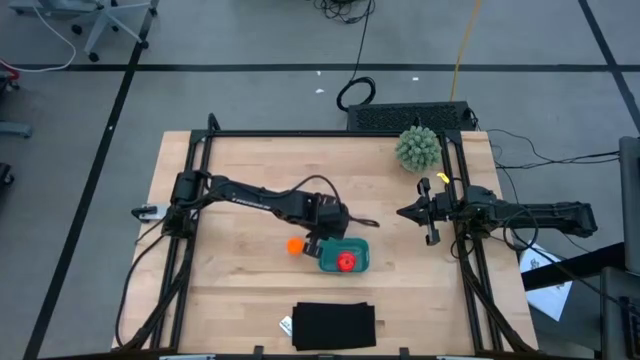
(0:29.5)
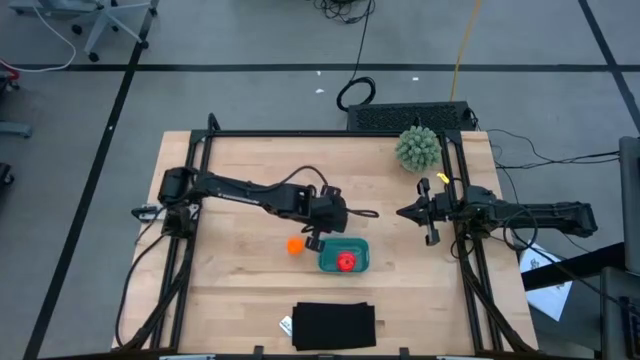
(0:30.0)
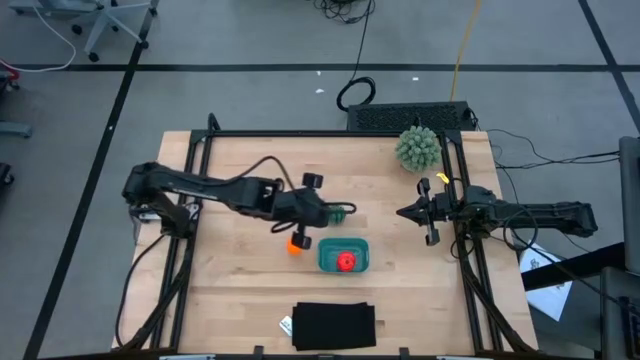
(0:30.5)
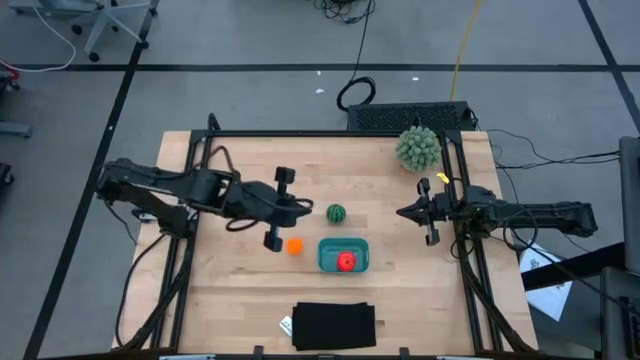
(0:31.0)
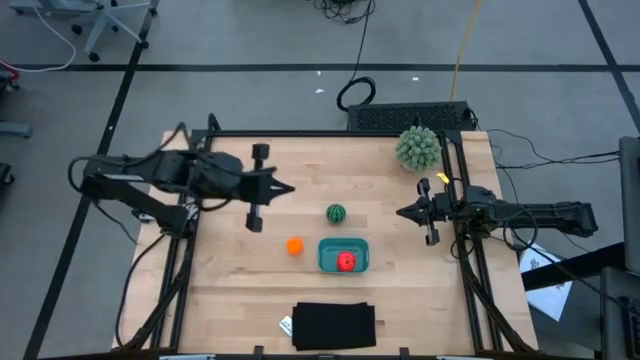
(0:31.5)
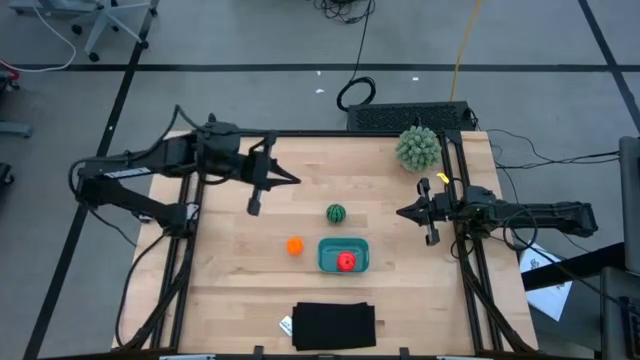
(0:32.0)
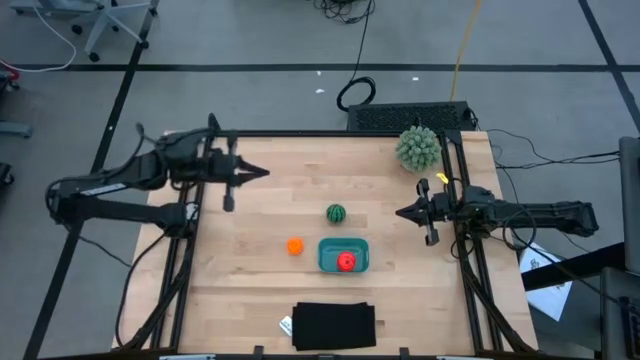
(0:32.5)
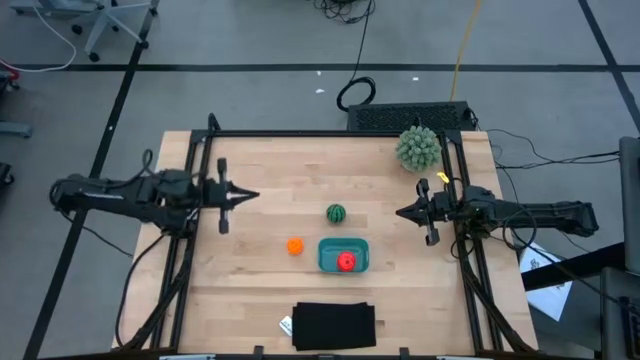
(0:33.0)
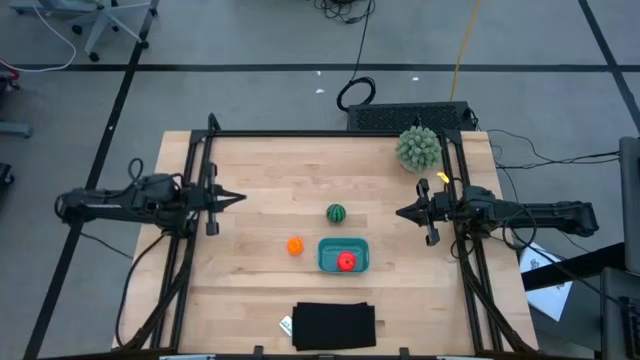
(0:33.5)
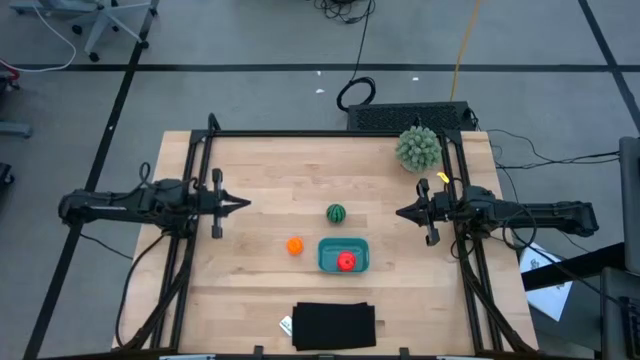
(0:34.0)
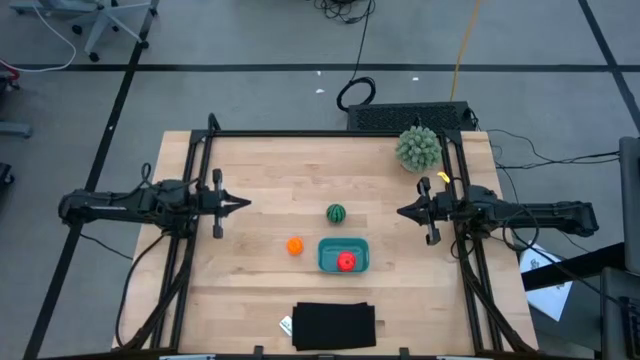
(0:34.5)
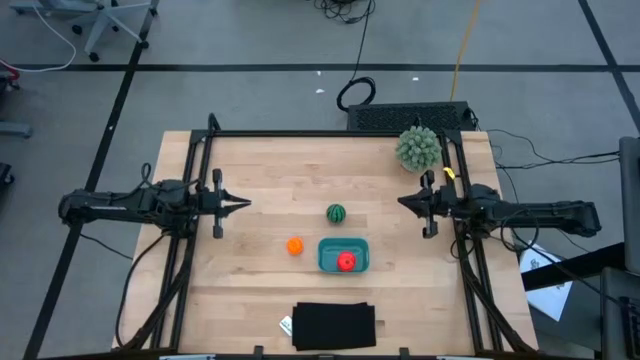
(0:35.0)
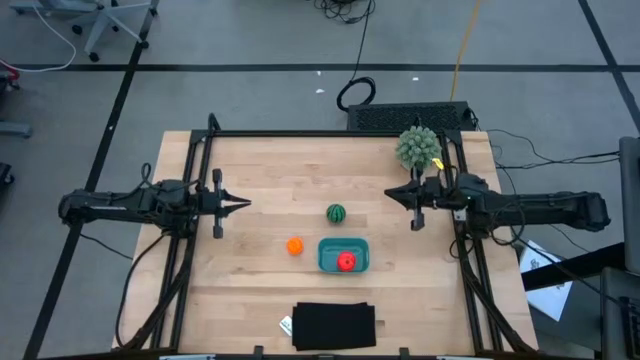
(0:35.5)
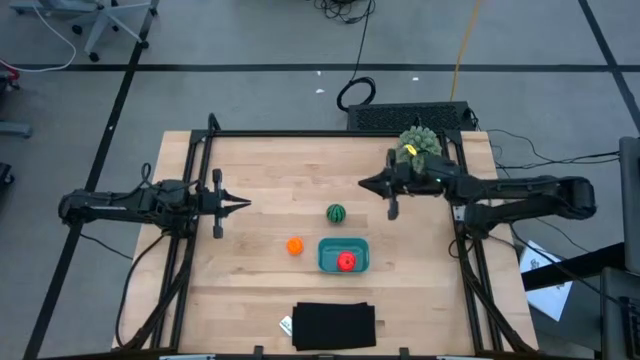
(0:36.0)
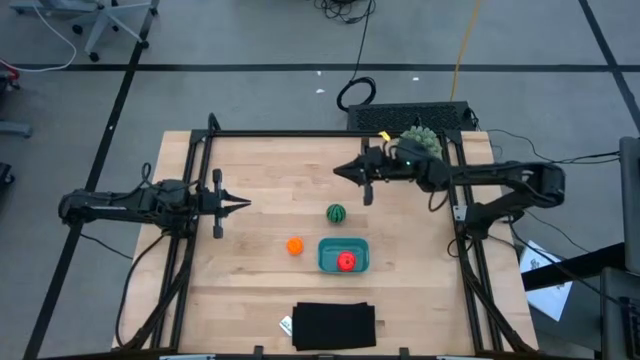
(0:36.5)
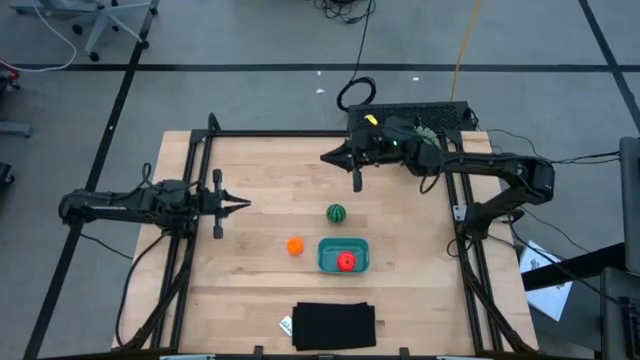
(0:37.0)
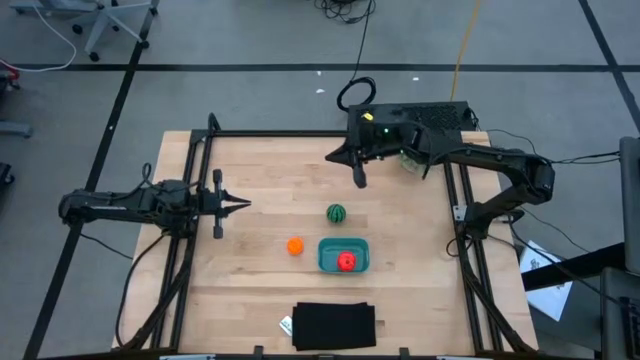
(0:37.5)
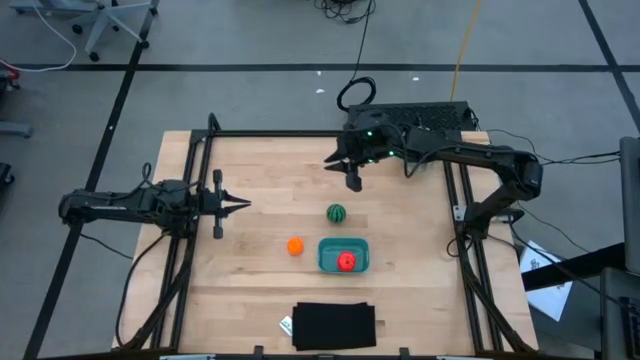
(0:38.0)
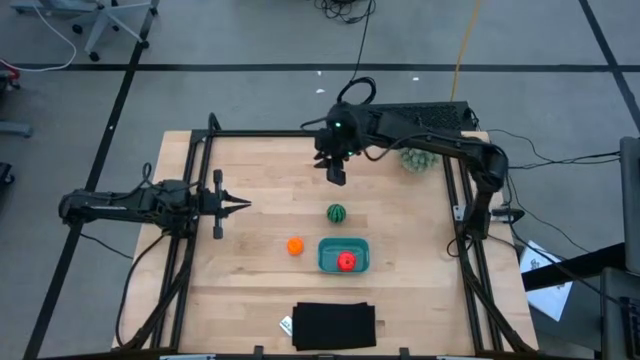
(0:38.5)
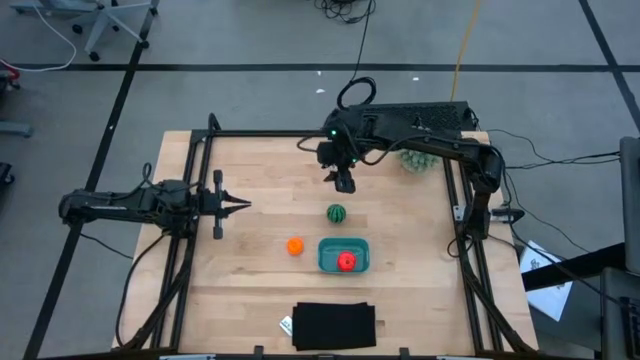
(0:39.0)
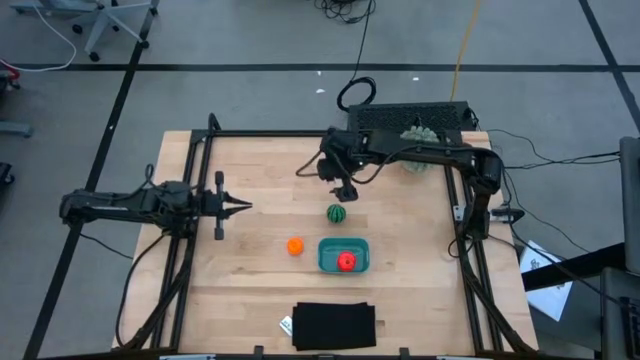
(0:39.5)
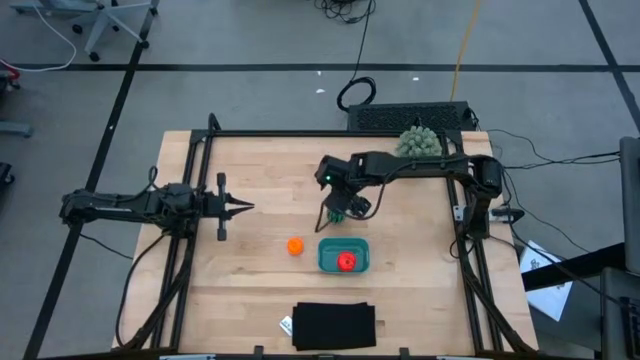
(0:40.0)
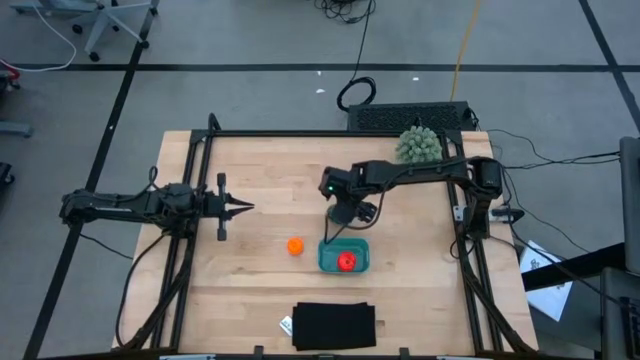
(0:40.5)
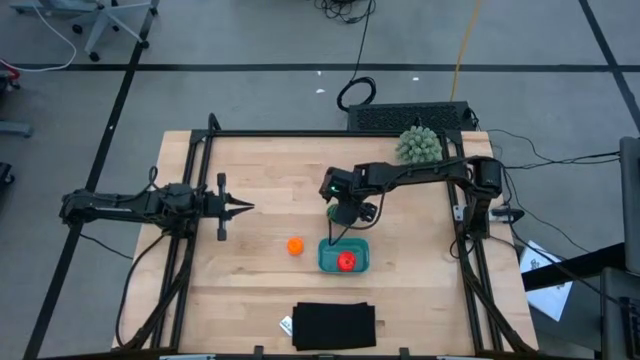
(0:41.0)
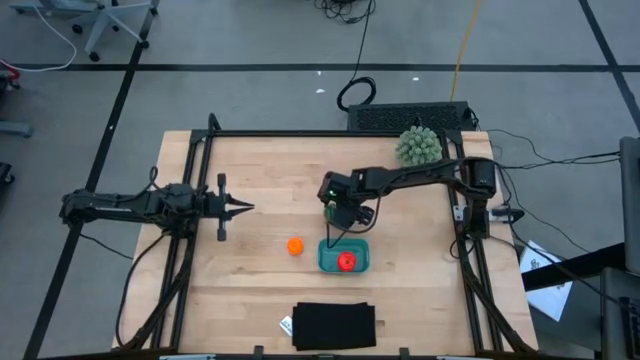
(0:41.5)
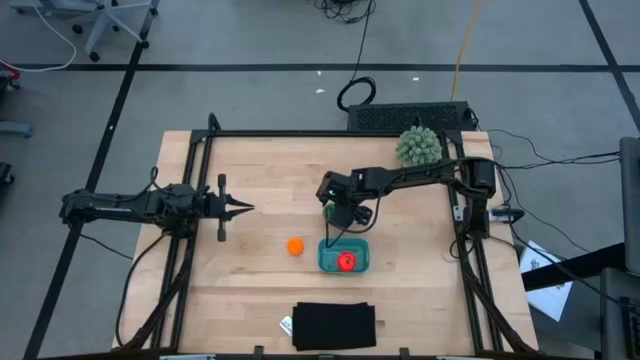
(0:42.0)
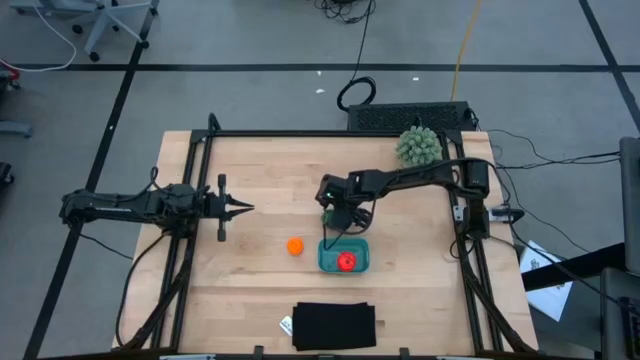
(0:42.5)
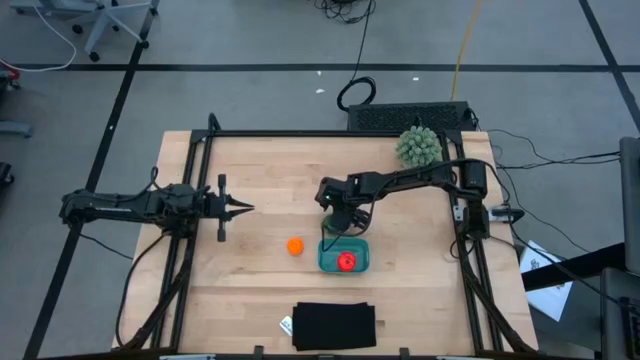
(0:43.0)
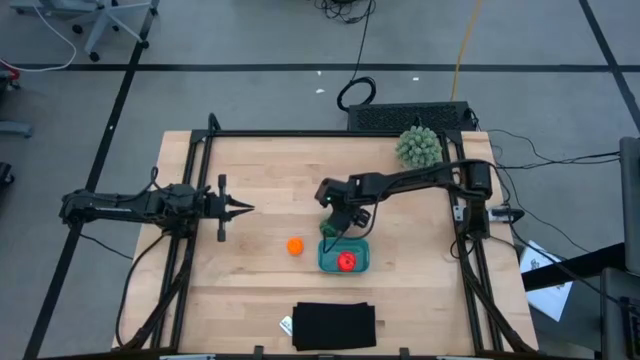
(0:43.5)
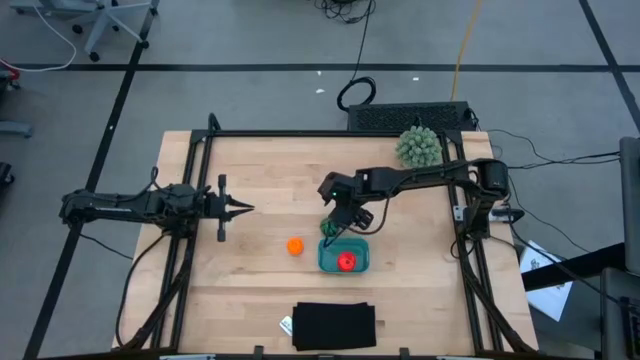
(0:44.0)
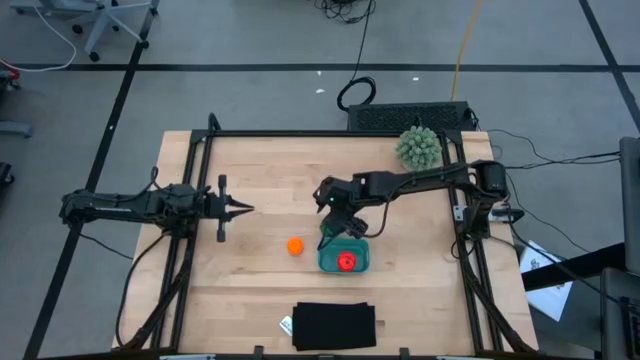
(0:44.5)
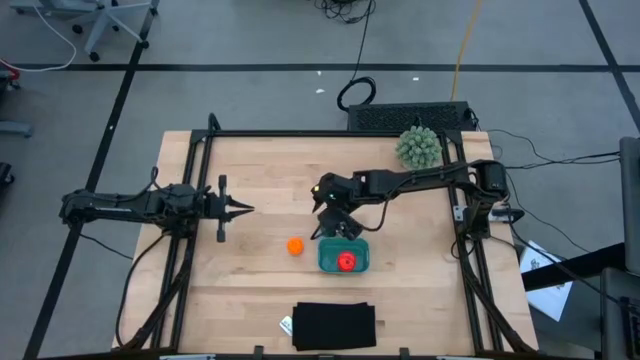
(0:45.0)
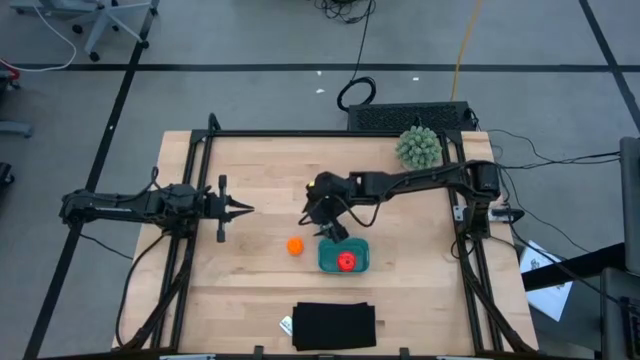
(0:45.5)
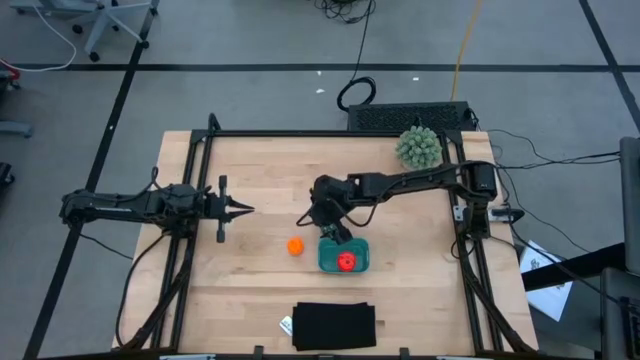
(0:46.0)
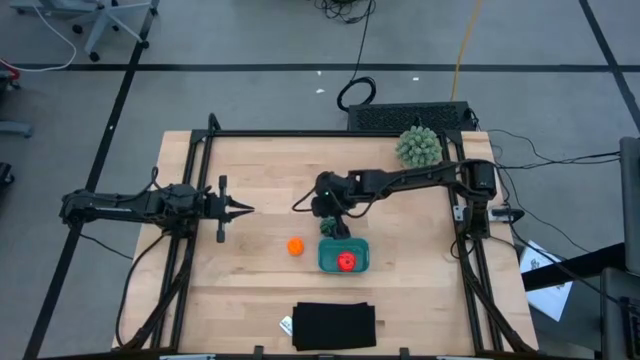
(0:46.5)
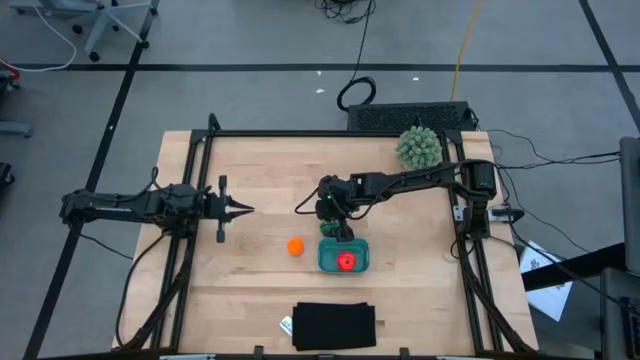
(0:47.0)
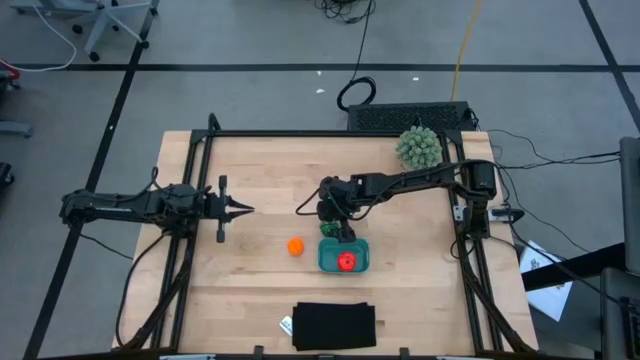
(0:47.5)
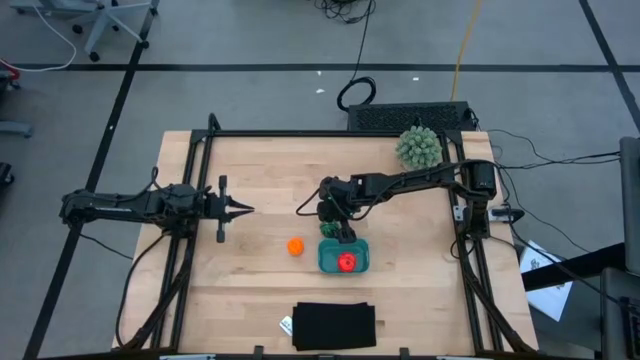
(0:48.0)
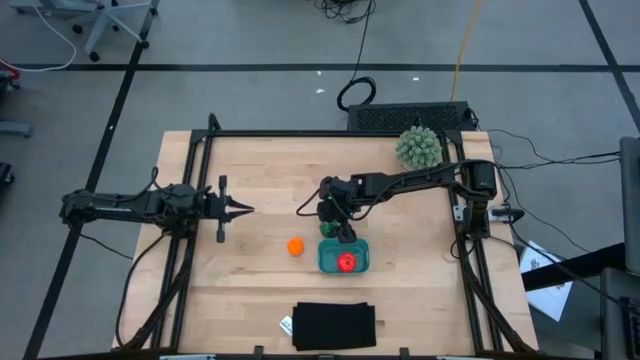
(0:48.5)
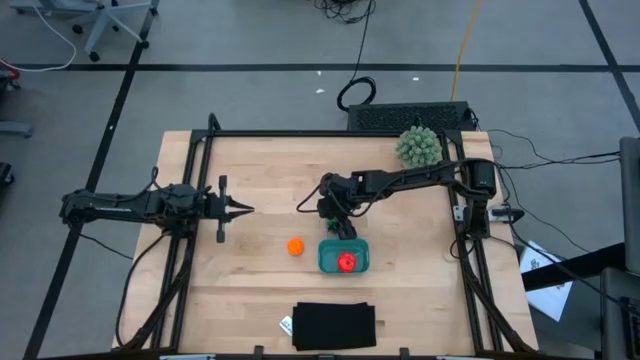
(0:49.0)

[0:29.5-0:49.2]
Task: Pick and placing Produce into tupperware
Put the watermelon into the blue bin
